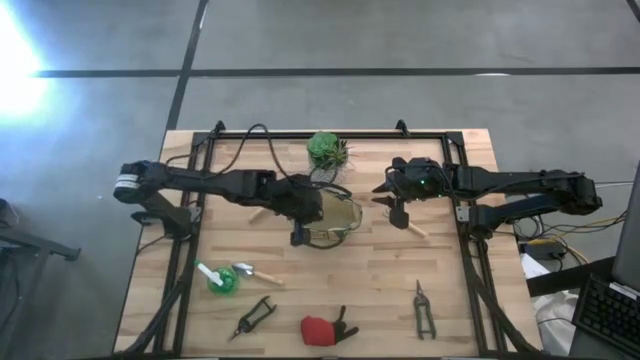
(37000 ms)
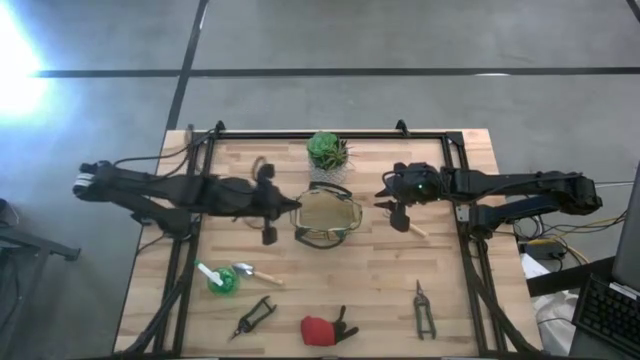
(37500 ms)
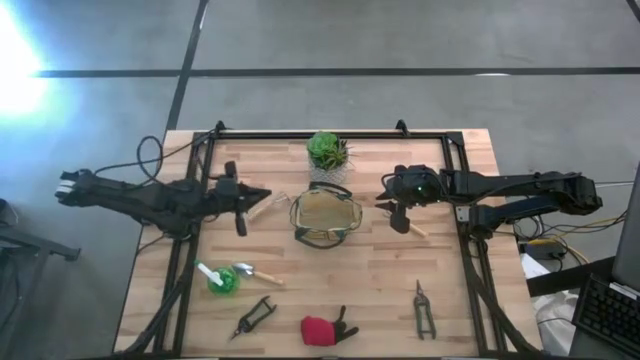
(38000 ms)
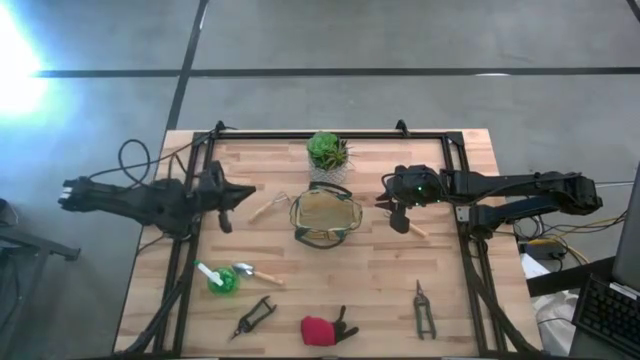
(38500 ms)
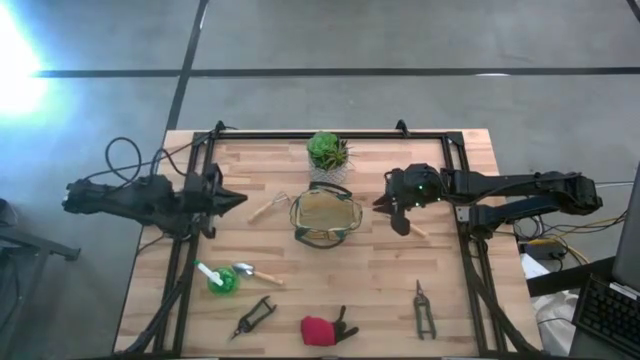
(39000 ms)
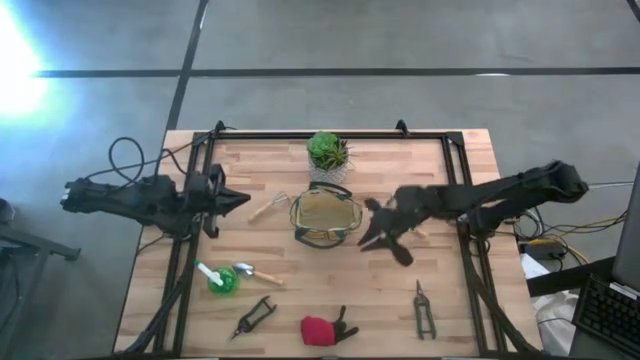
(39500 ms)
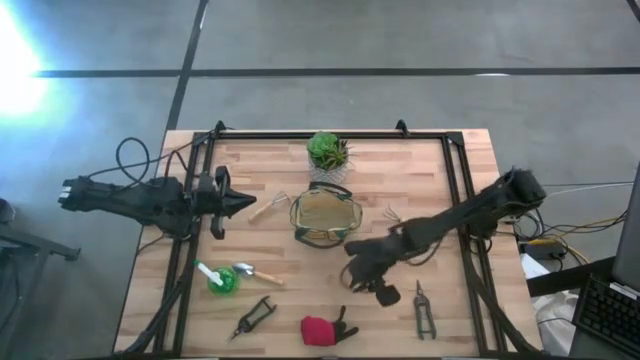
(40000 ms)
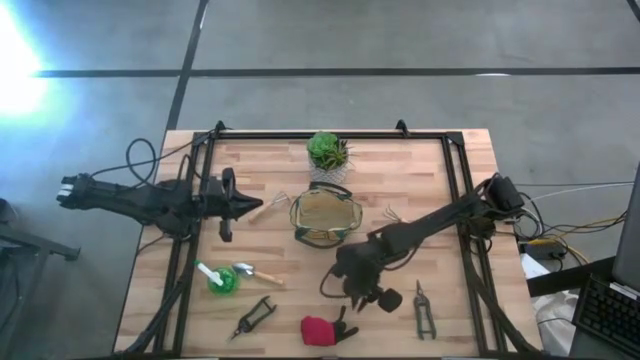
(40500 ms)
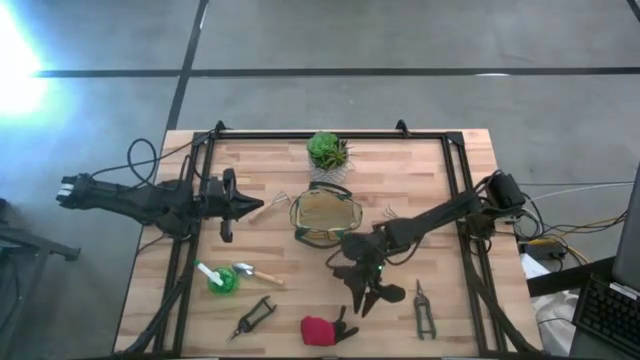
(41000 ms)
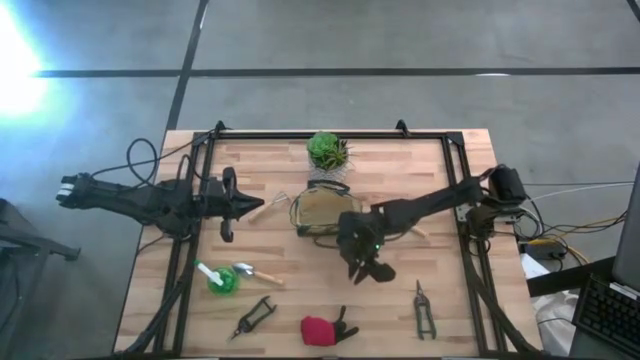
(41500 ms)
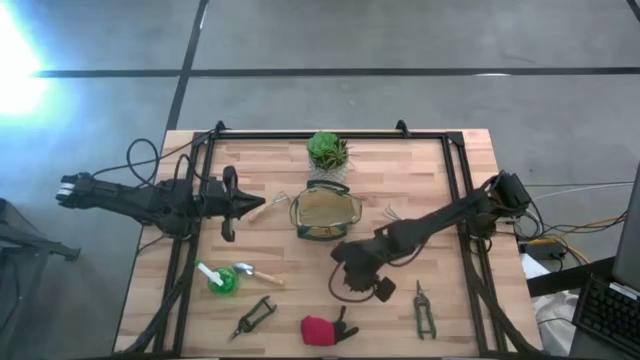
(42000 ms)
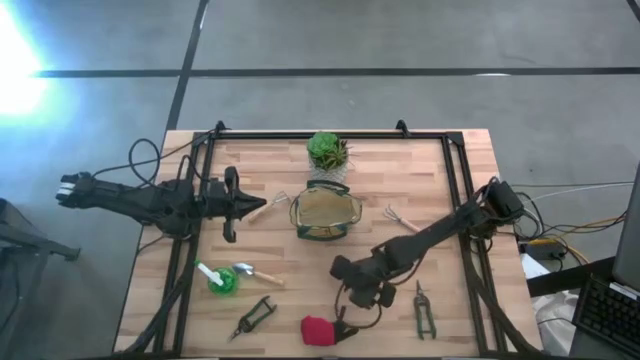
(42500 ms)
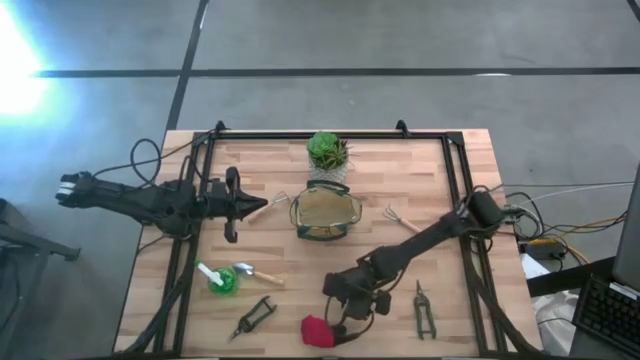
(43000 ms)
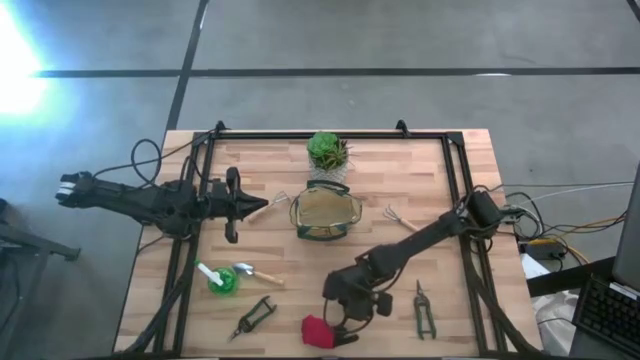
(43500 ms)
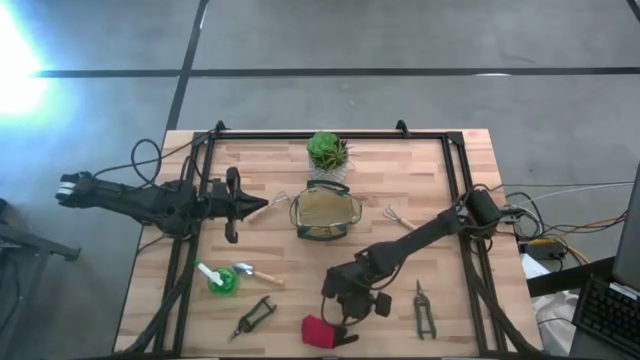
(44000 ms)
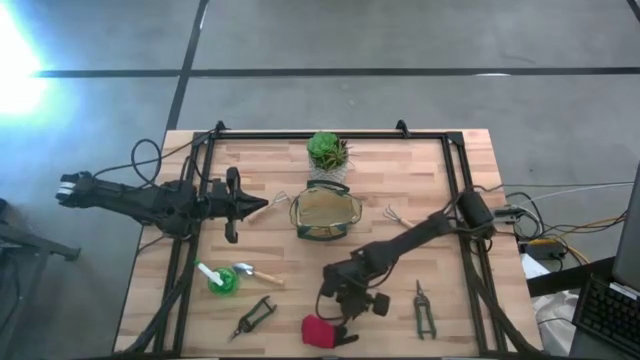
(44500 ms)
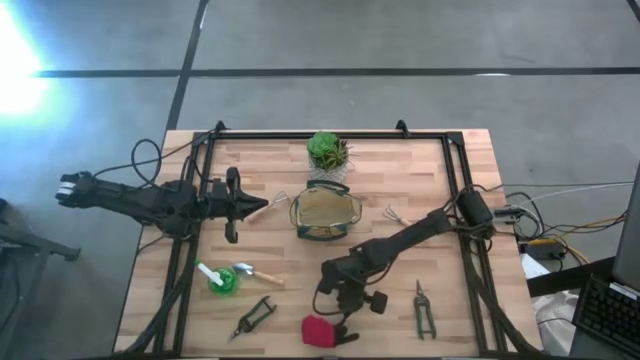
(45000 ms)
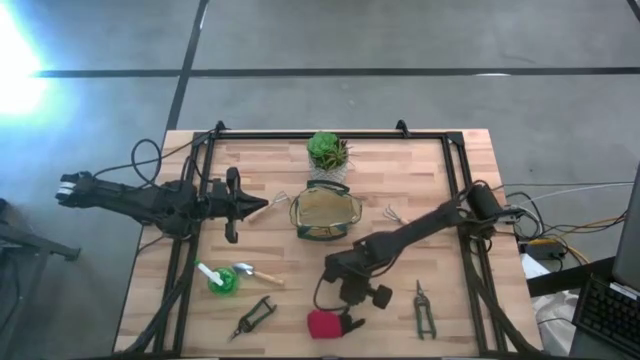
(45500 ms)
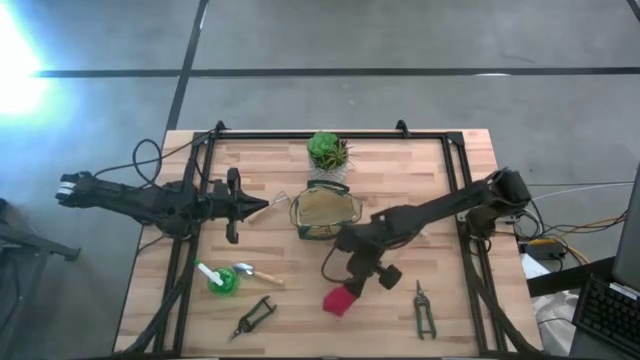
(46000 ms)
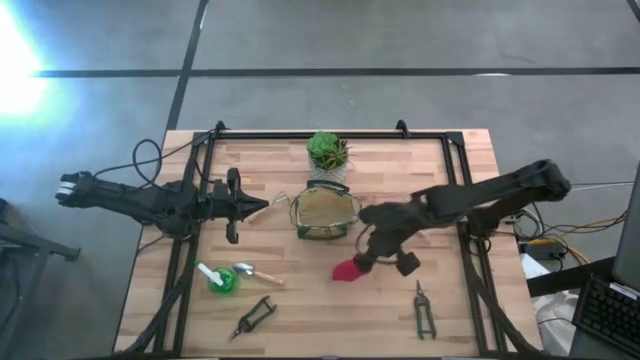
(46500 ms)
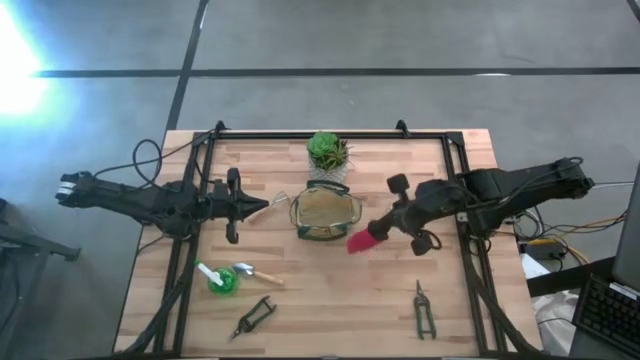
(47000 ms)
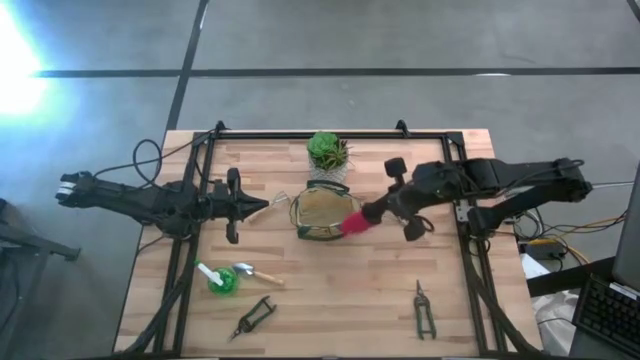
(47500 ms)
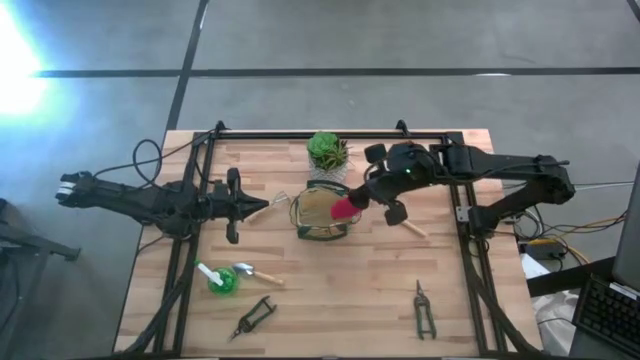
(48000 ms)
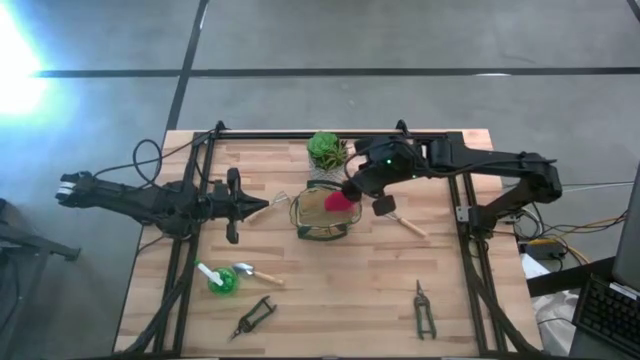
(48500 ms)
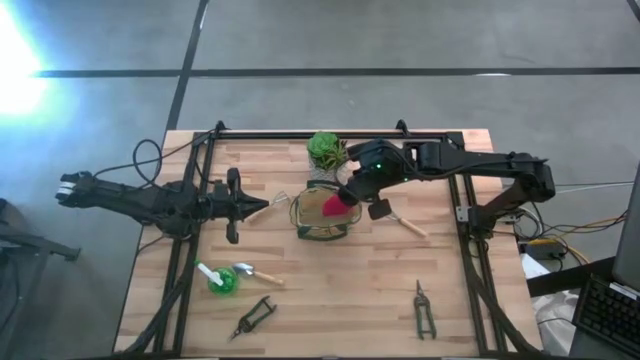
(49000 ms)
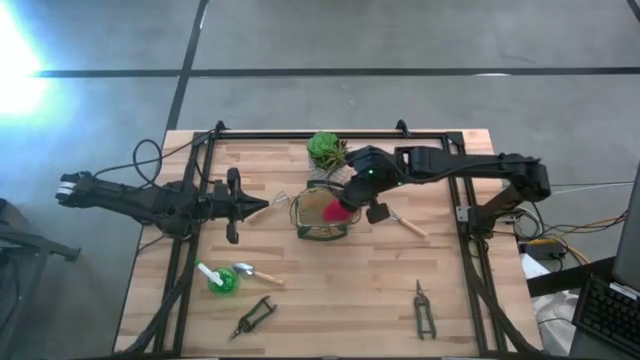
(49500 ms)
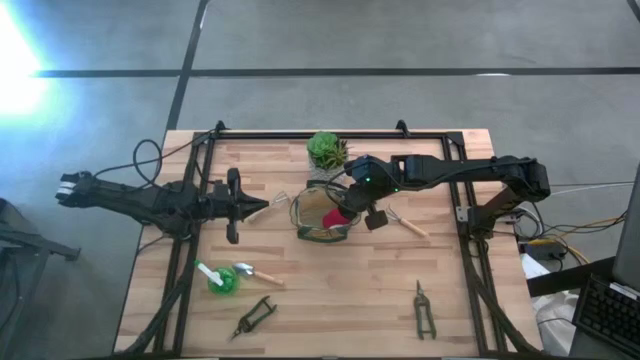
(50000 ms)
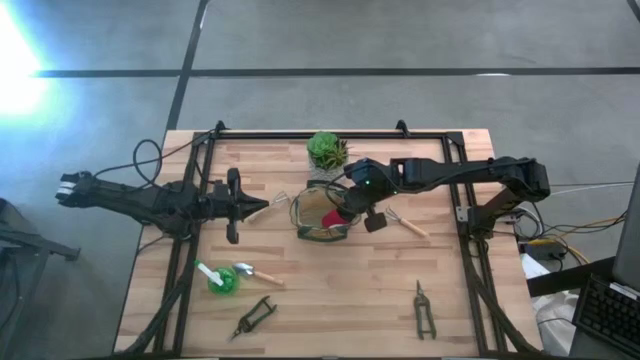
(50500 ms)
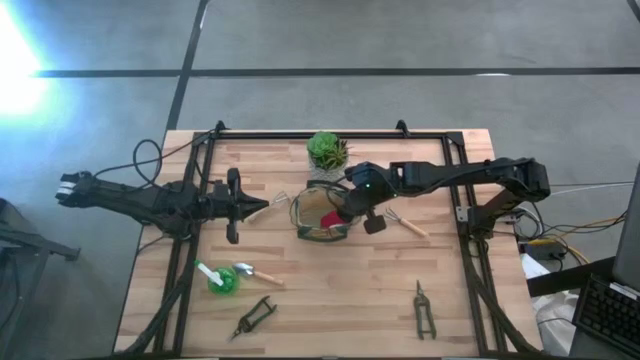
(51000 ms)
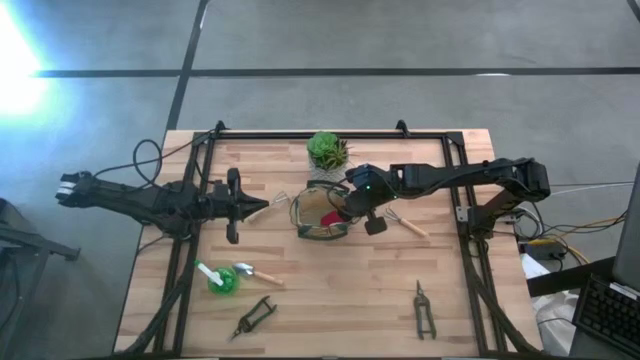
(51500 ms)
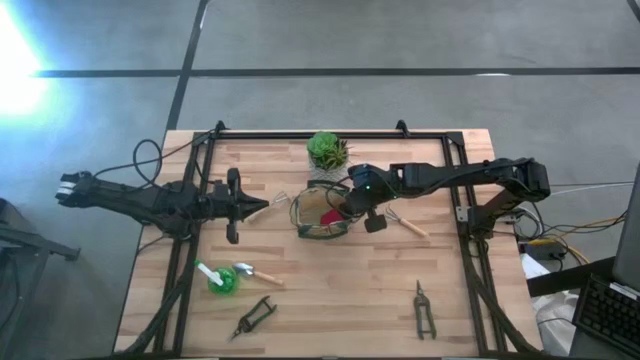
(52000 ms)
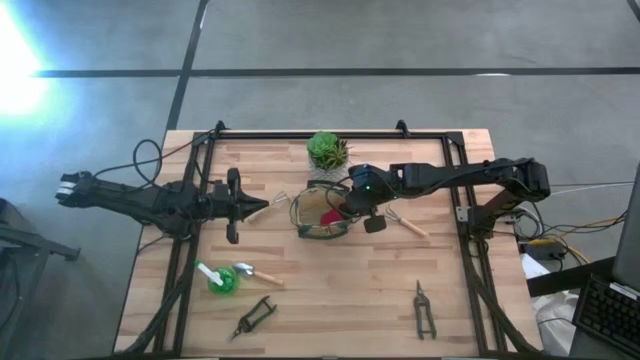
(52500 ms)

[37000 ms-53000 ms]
Task: Pick & Place Garden tools in Gardening bag
Put the red gloves into the gardening bag

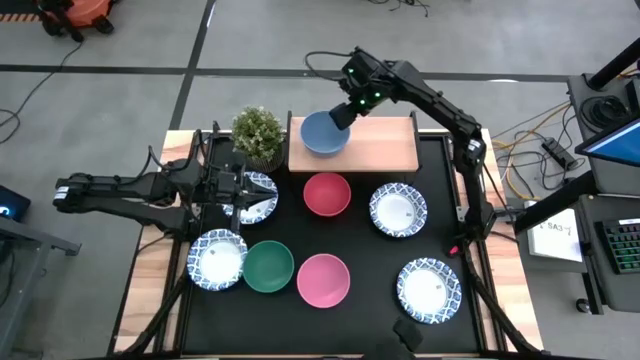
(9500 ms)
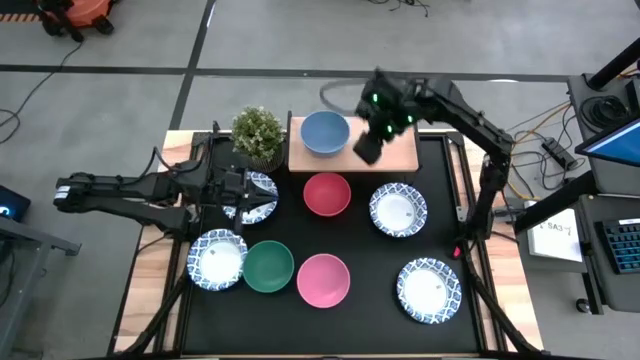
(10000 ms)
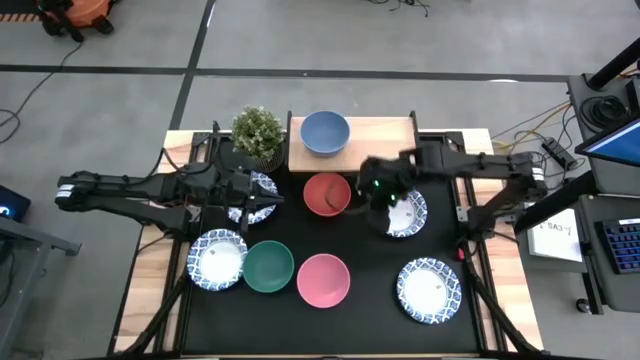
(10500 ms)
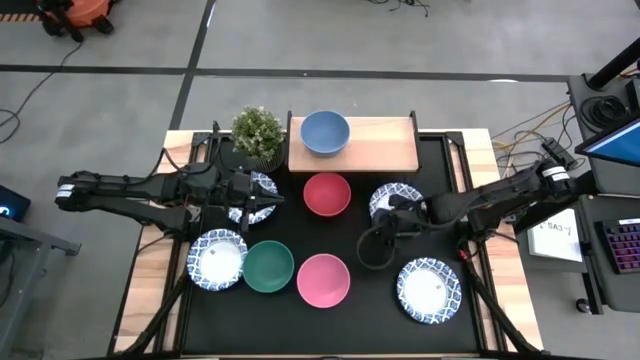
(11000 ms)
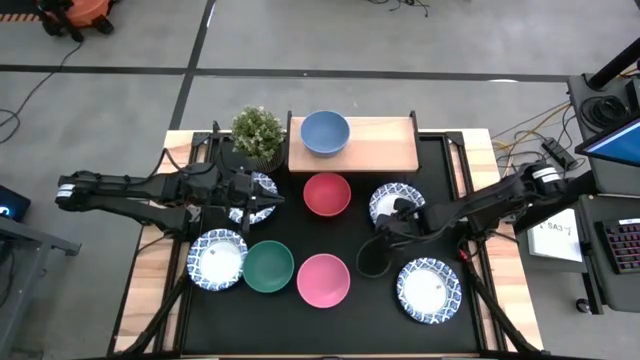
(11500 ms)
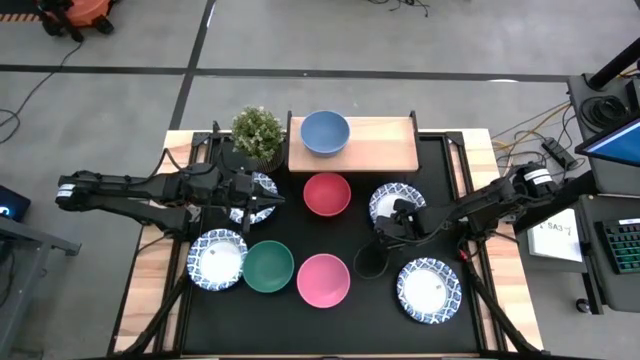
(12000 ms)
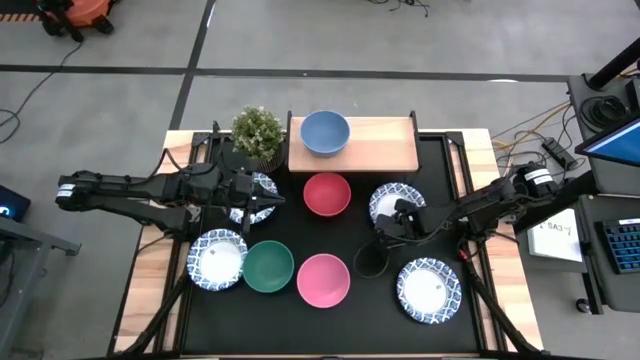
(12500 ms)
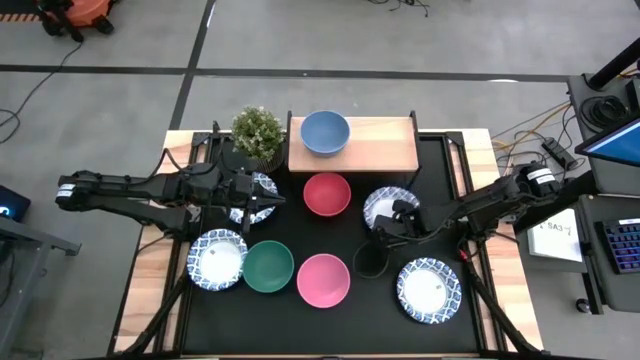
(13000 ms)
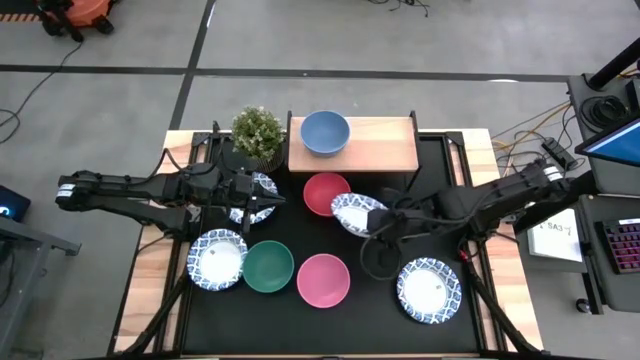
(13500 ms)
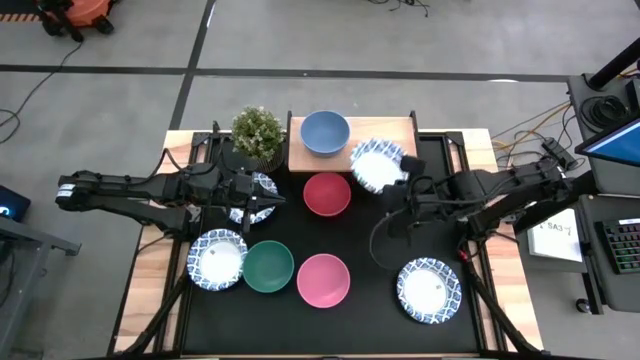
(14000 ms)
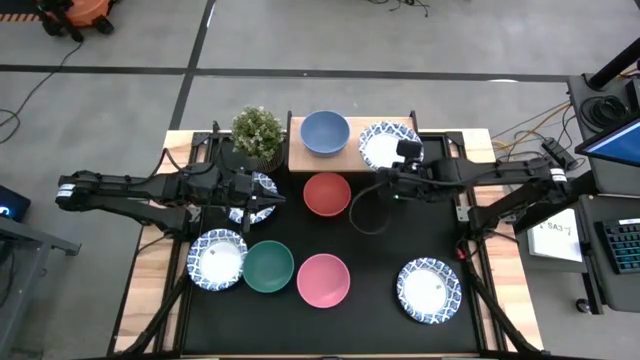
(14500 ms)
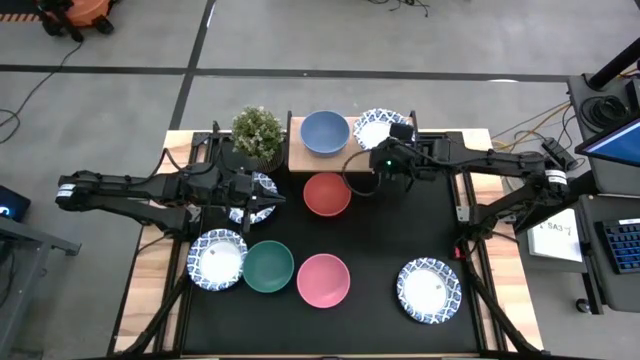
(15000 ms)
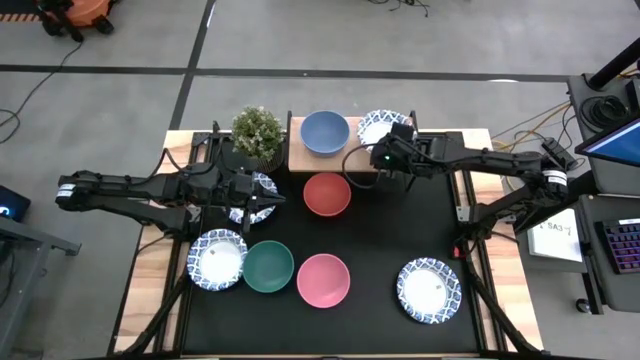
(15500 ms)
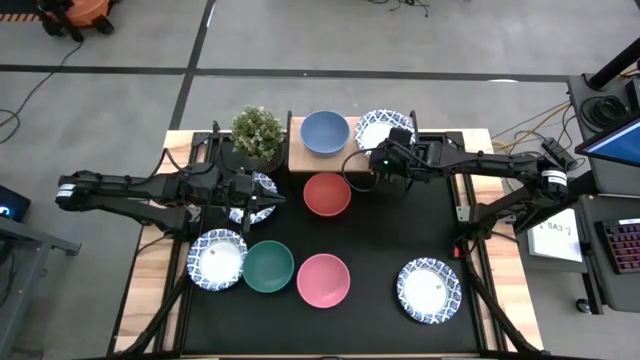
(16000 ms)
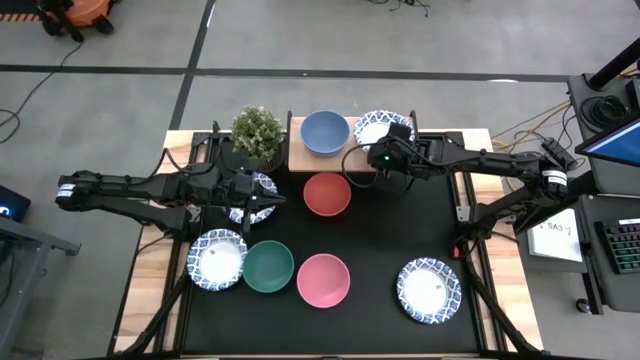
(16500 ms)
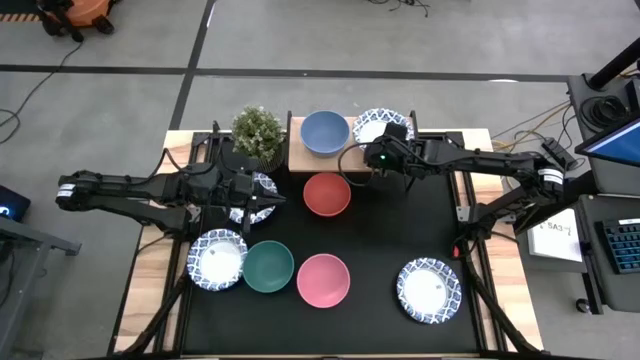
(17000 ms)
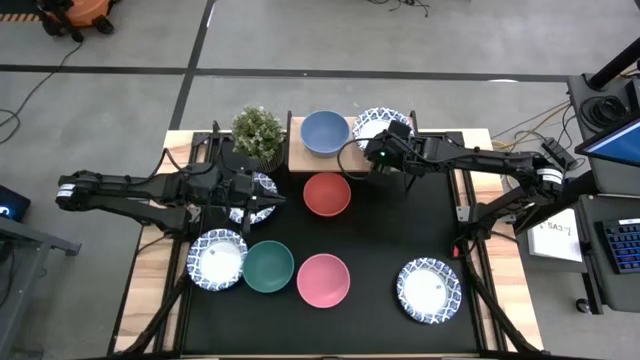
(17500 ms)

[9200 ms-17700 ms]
Task: Place and stack bowls onto a shelf
Put the top right white patterned bowls on the shelf
